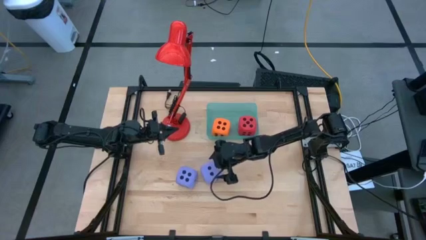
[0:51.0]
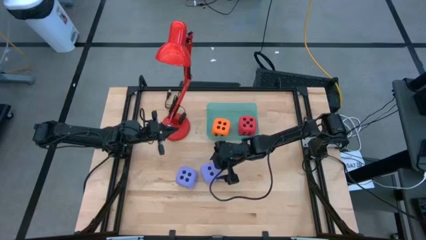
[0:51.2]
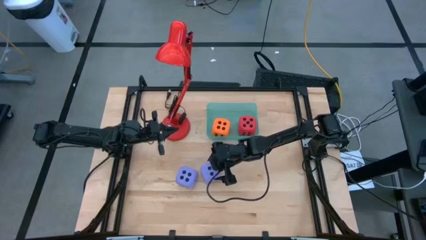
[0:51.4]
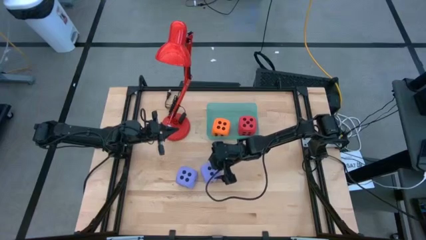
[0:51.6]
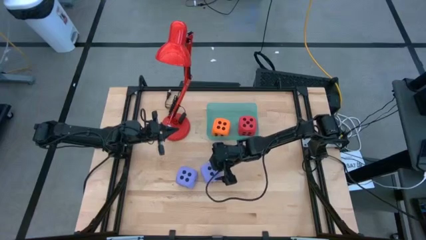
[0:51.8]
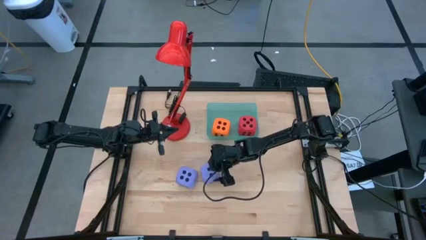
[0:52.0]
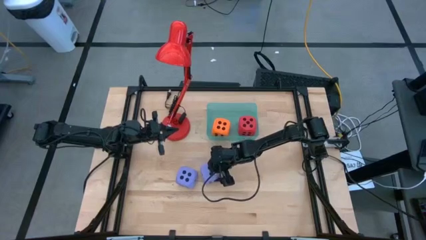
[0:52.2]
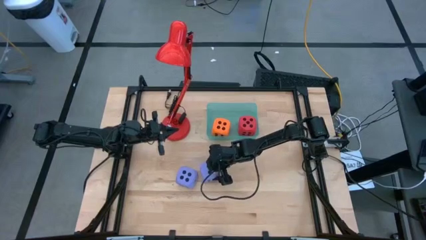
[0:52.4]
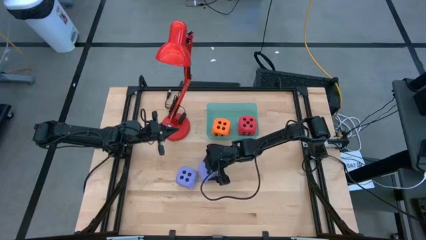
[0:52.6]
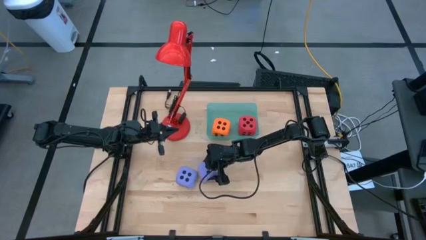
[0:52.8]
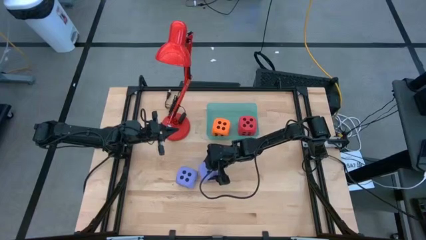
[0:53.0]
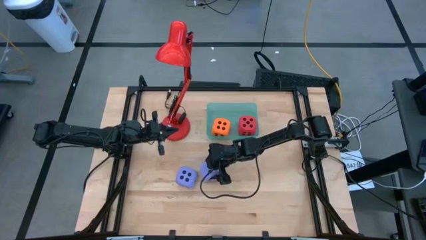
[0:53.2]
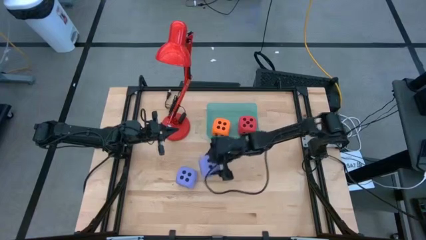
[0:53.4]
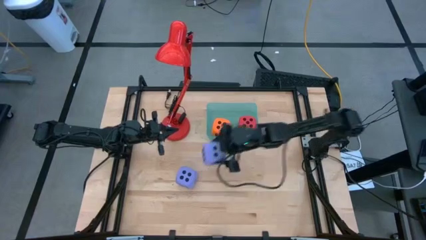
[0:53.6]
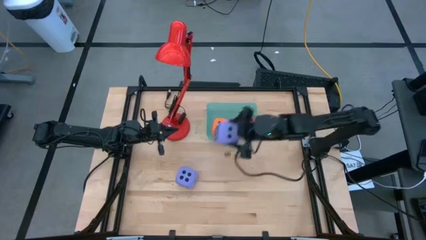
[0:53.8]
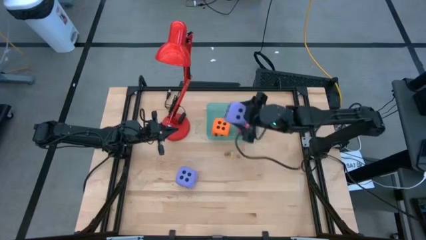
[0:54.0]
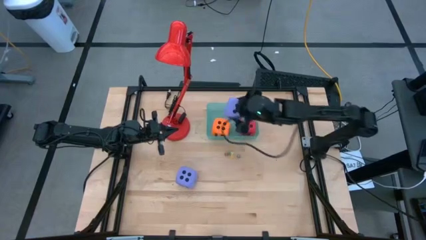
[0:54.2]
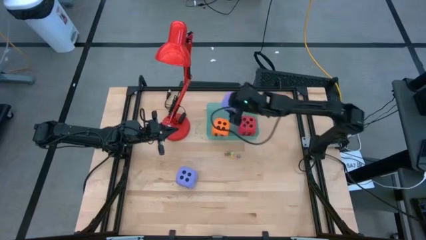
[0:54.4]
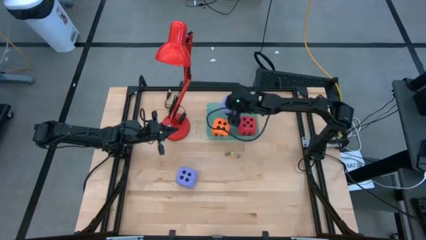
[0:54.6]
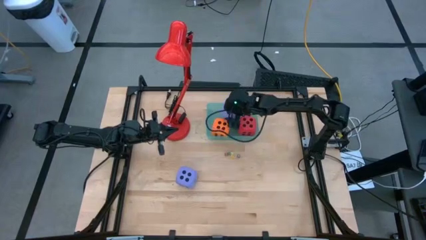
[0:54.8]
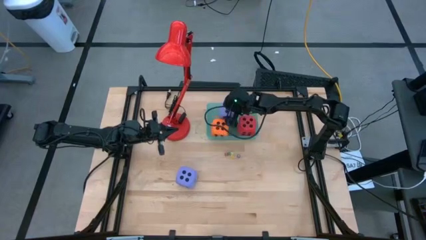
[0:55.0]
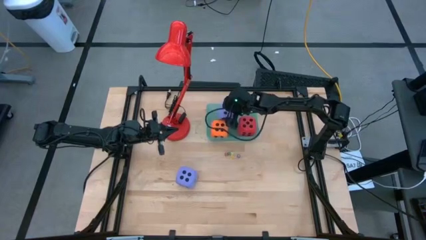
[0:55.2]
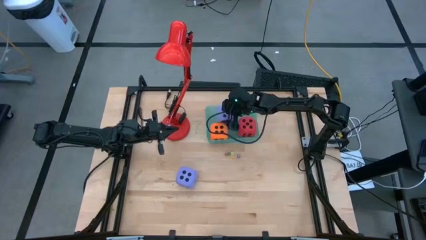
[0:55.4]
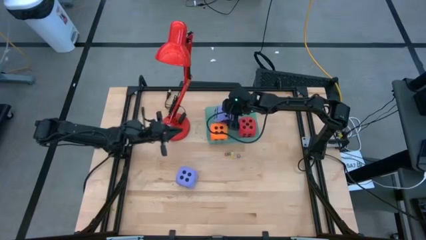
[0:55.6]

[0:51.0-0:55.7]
Task: Pick & Place Dice
Put the large right purple dice into the bin

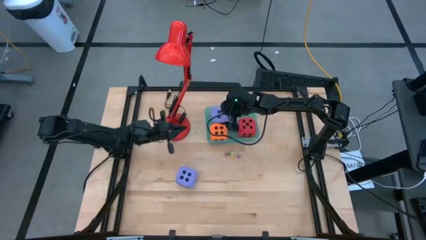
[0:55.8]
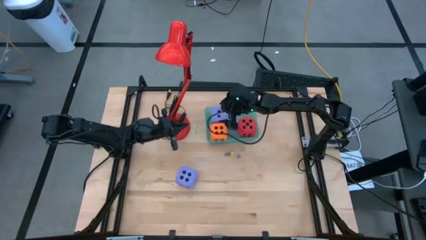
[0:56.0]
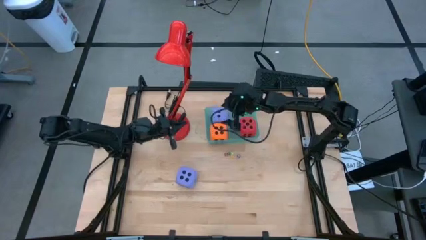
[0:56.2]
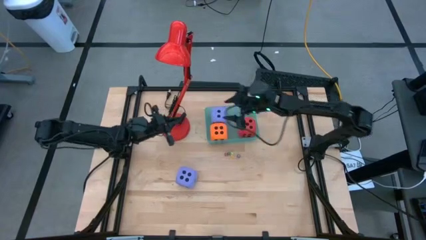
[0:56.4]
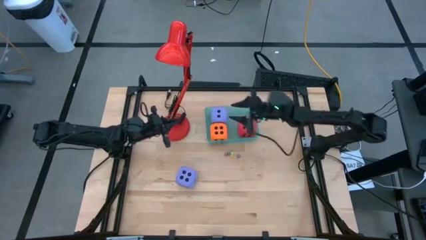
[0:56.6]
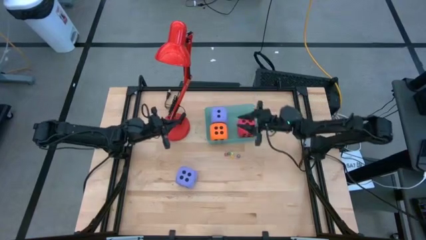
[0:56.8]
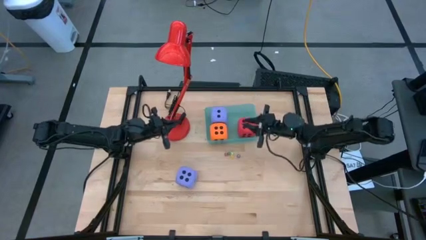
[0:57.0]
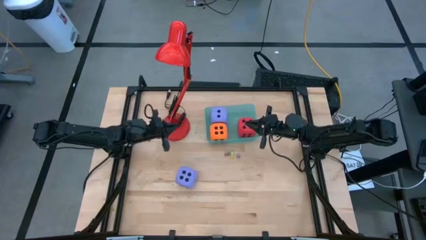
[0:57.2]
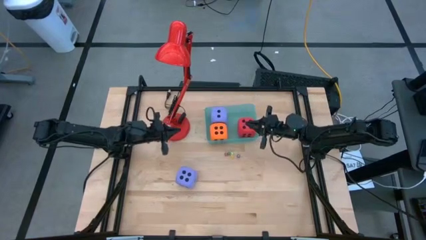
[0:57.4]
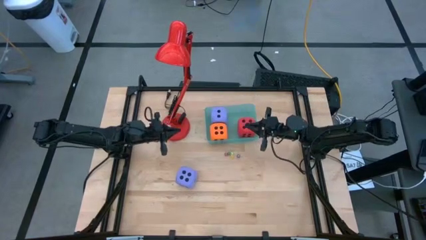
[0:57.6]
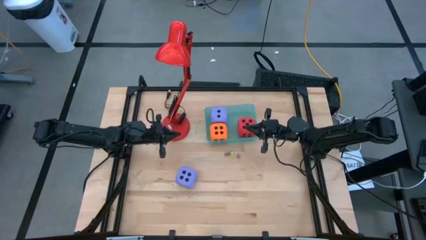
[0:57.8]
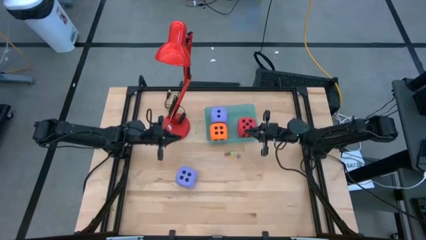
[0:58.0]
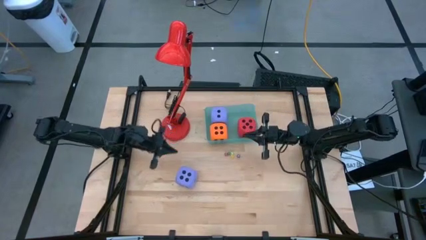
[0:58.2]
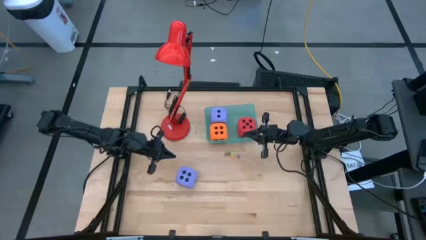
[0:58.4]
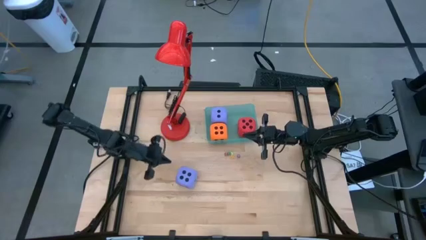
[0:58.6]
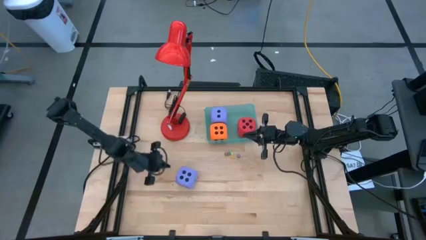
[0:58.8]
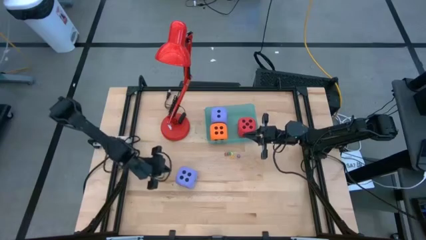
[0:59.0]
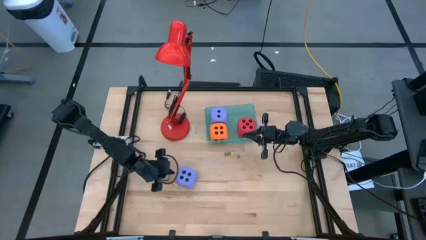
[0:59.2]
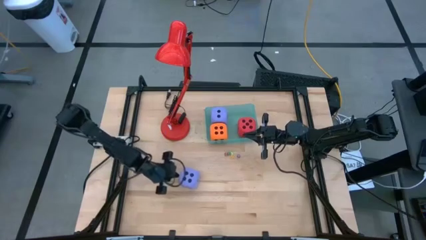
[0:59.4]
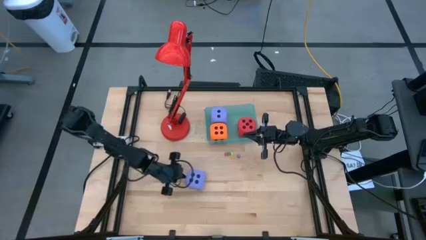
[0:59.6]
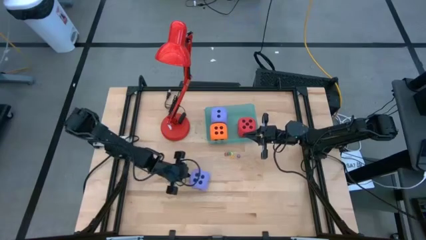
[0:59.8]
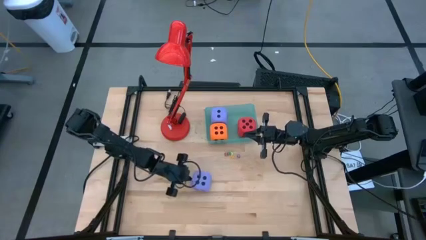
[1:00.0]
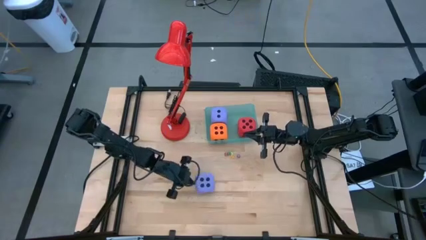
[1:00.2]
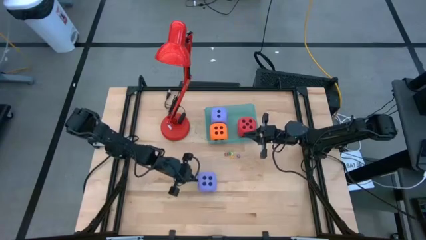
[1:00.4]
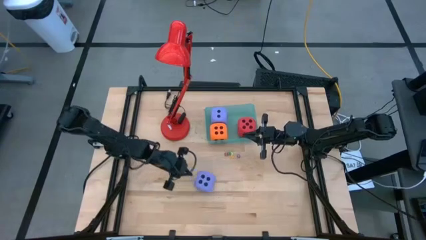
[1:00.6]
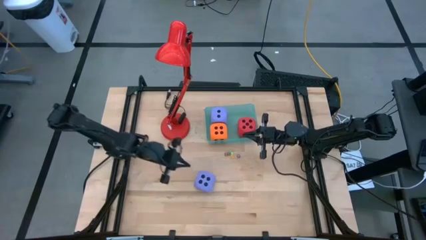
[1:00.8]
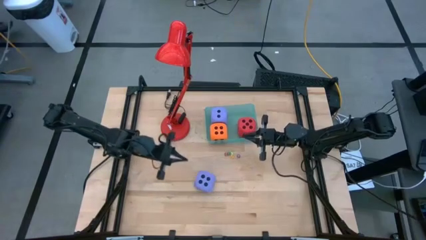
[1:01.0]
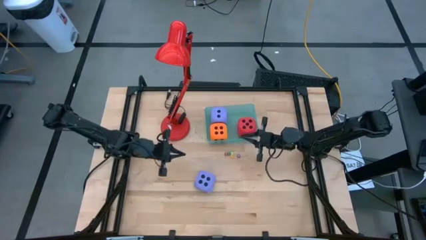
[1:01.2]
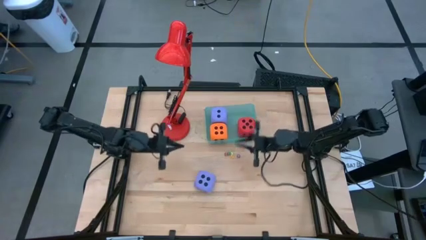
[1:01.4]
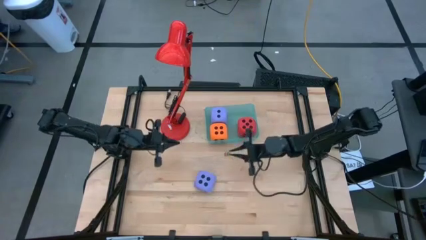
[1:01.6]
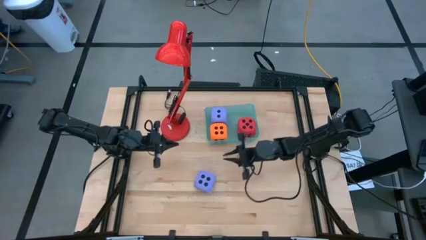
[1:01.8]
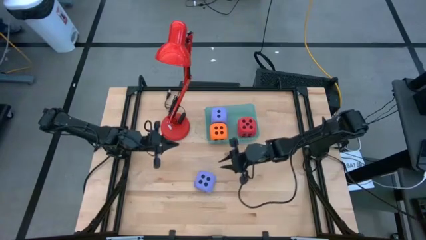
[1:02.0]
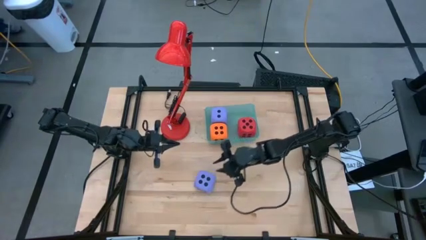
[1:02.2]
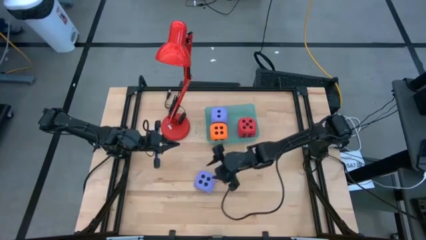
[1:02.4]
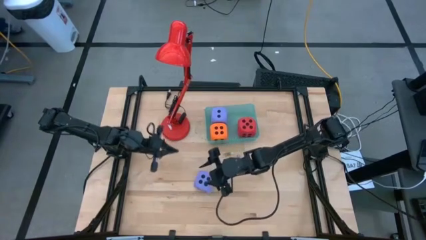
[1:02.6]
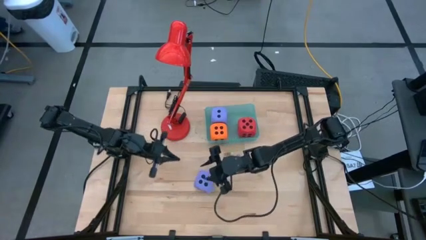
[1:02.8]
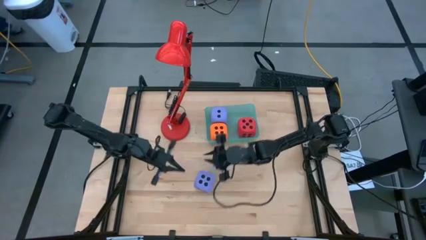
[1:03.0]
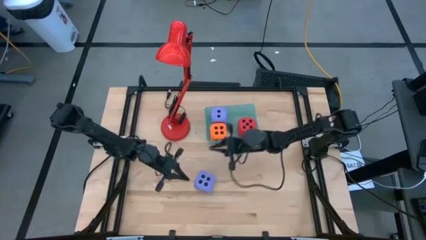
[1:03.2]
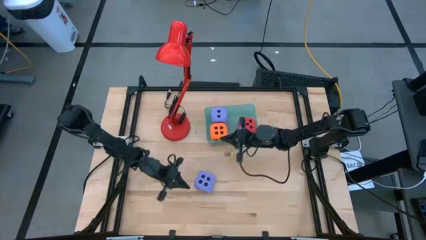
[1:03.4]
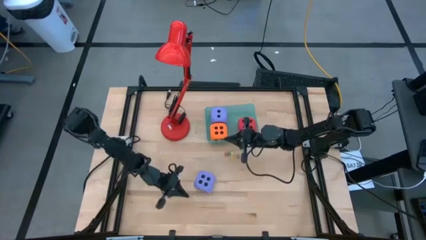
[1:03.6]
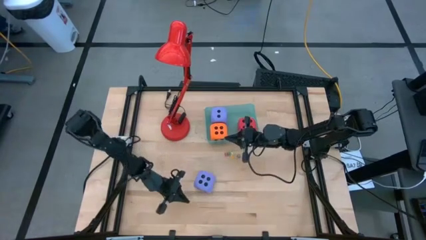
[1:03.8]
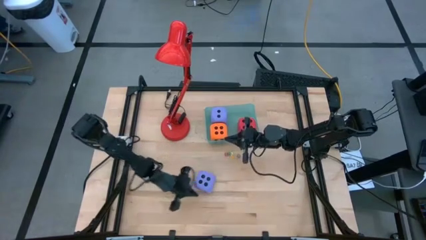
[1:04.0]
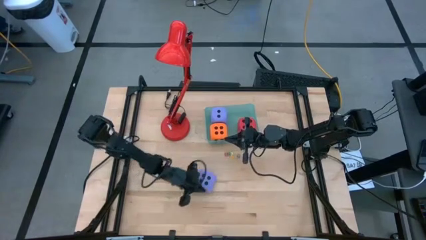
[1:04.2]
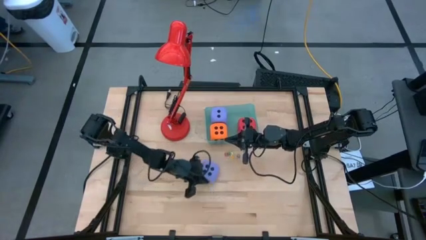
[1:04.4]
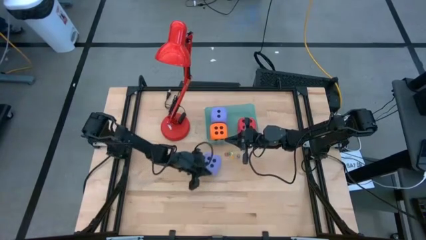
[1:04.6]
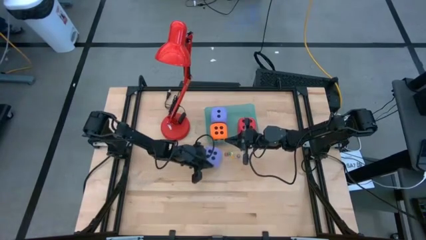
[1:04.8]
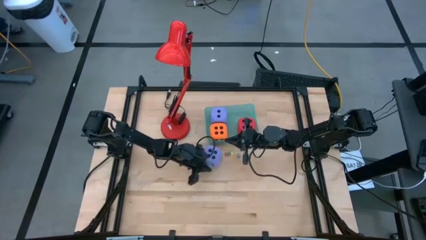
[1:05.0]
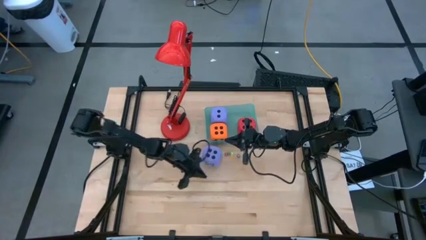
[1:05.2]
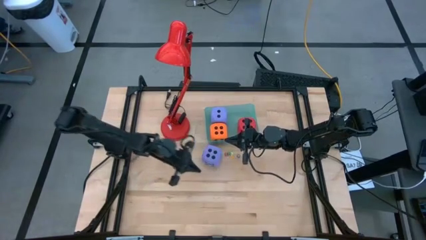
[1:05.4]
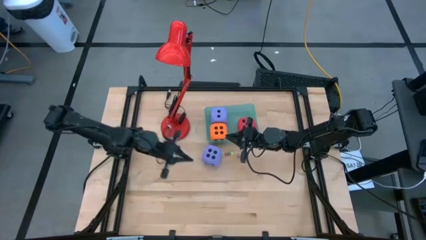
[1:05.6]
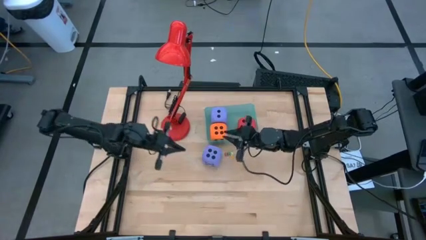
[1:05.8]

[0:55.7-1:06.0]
Put the large purple dice into the bin

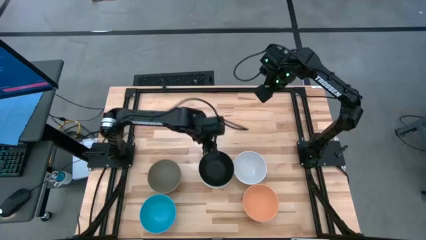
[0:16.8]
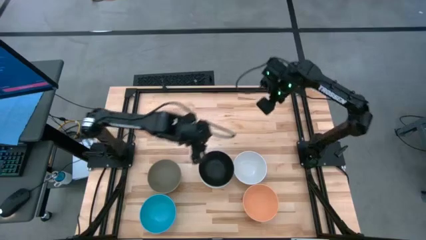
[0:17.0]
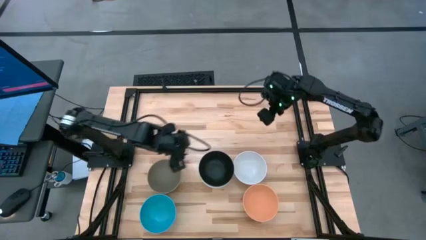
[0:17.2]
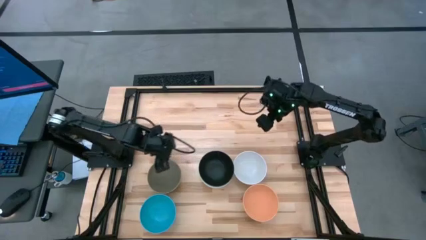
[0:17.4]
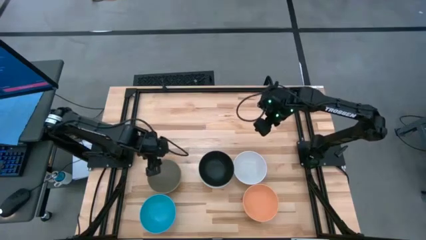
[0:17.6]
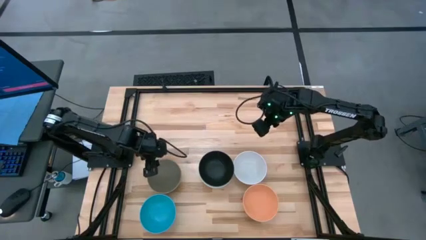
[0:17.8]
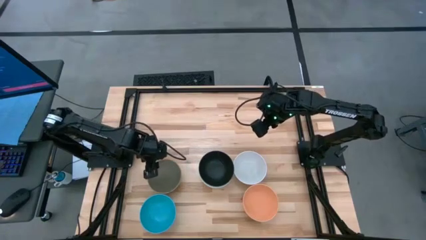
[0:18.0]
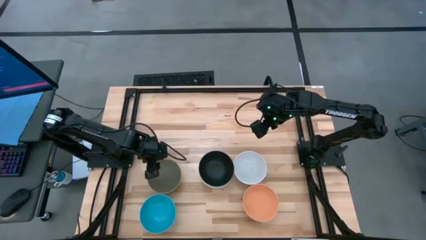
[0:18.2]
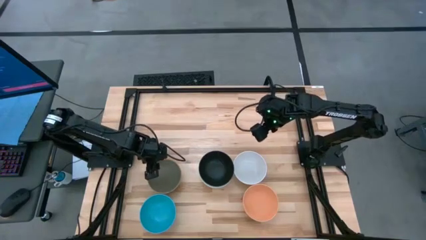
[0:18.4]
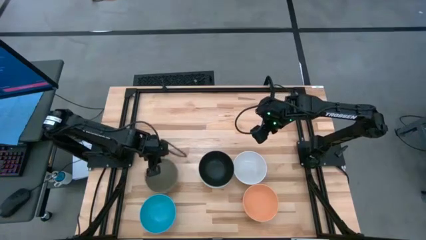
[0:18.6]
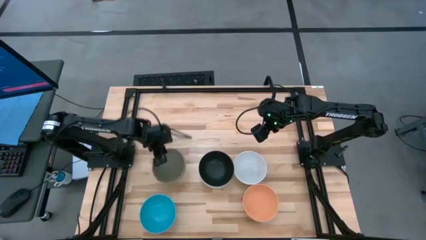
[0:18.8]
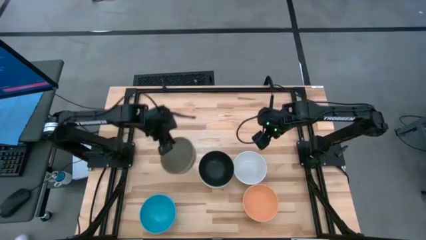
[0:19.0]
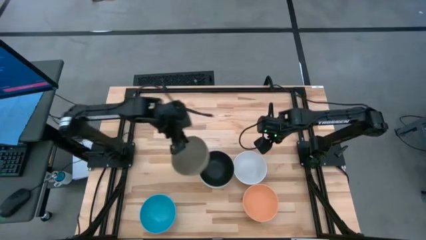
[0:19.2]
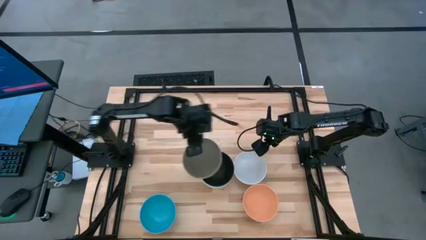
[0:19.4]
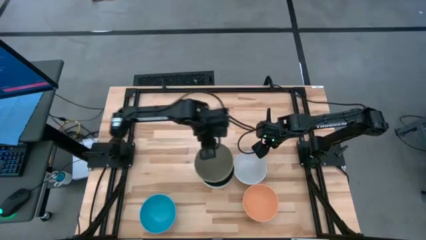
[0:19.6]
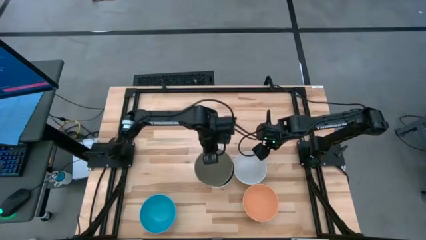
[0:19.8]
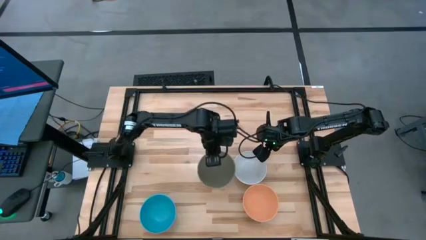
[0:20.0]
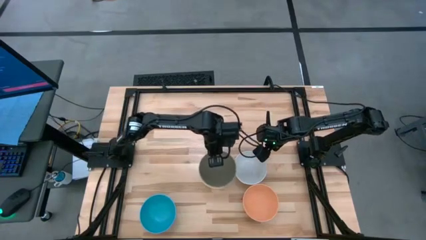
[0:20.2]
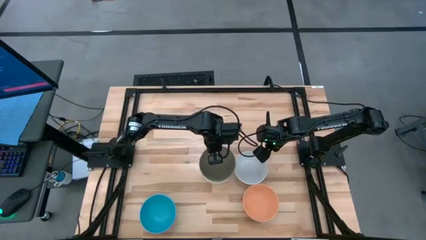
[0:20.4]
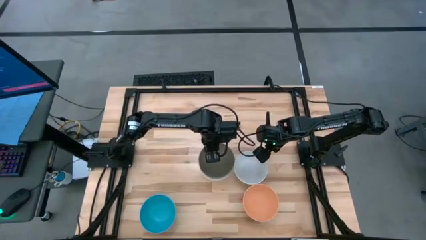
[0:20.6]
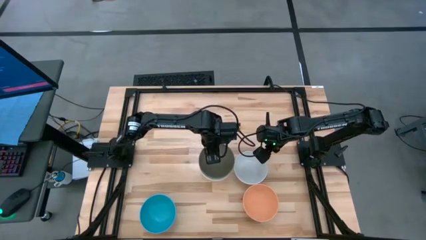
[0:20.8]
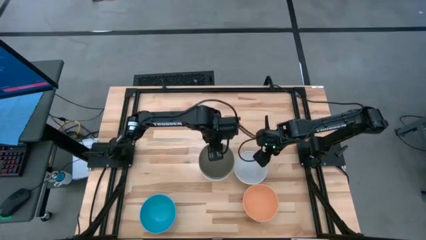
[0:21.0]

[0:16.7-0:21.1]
Task: Nest bowls inside each other
Stack the gray bowl on top of the black bowl
